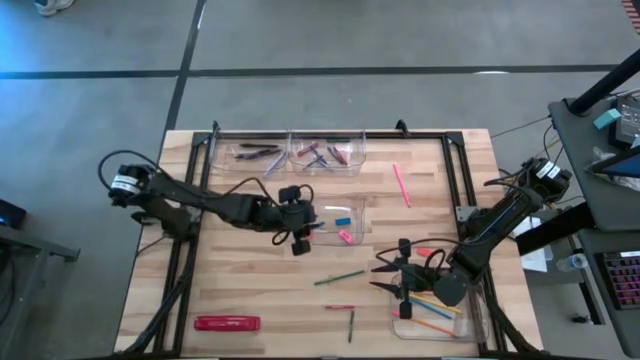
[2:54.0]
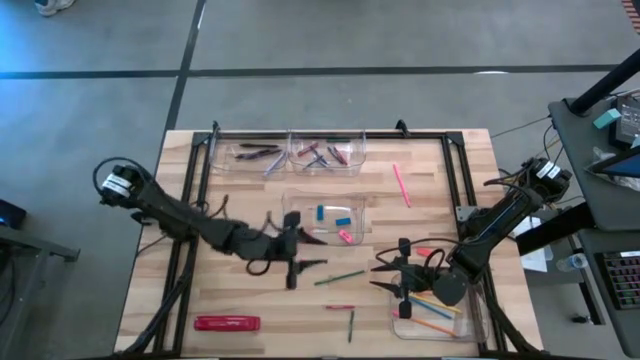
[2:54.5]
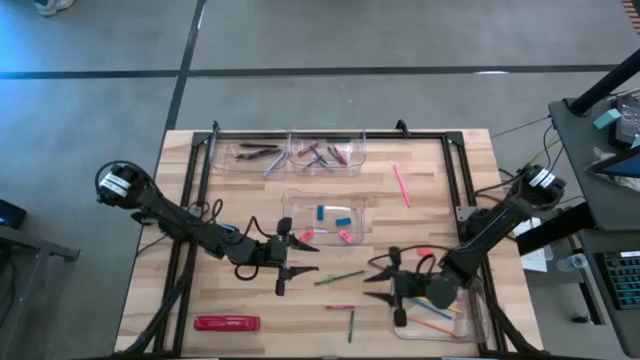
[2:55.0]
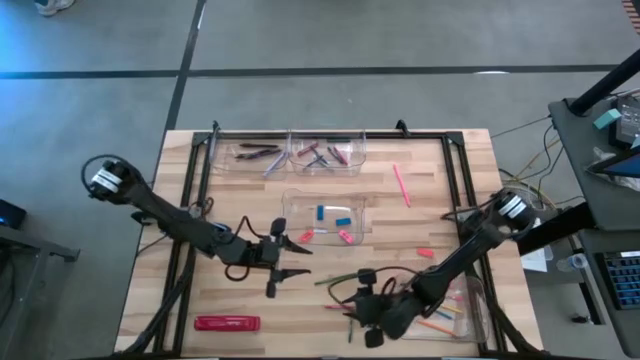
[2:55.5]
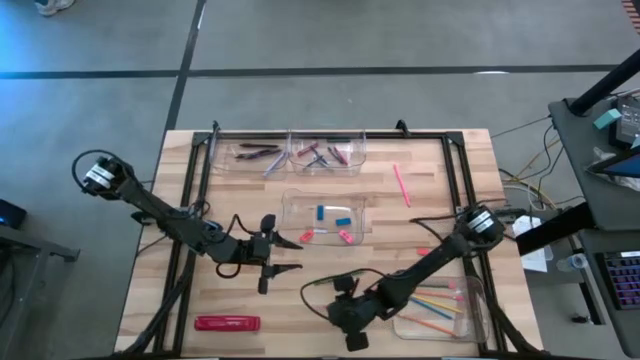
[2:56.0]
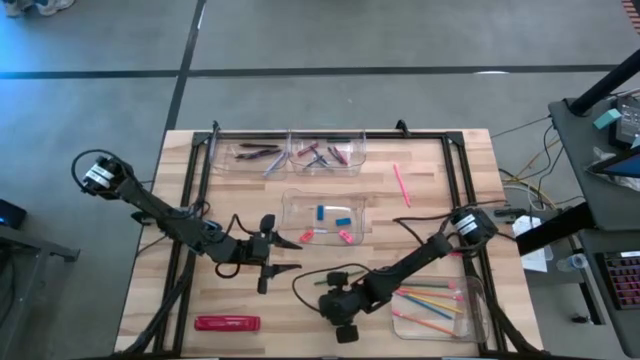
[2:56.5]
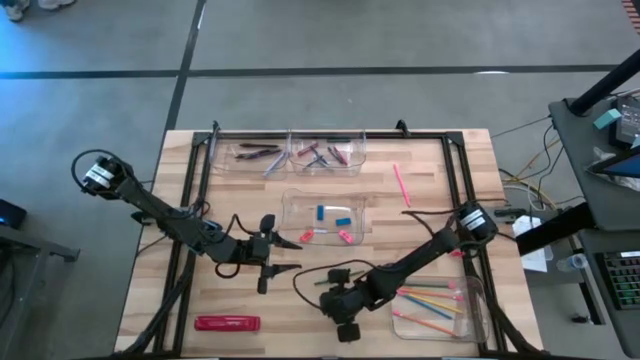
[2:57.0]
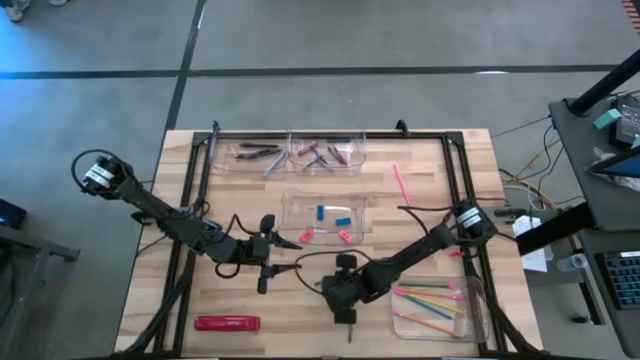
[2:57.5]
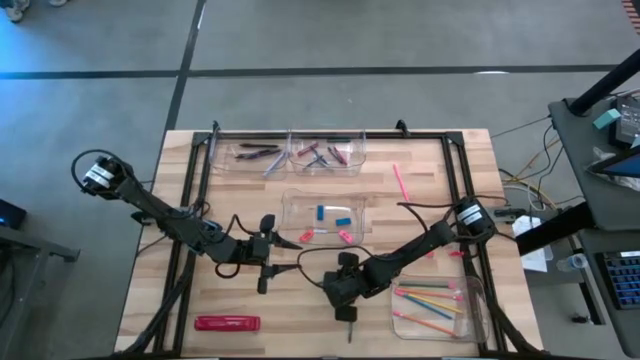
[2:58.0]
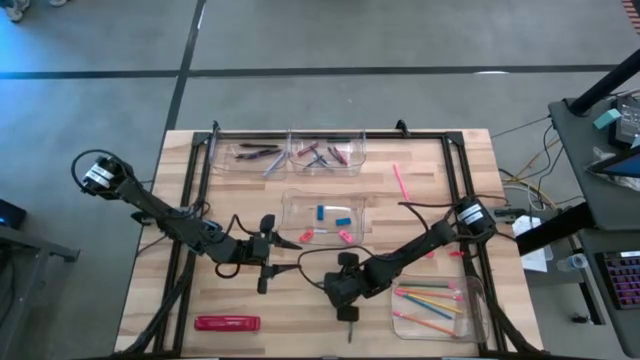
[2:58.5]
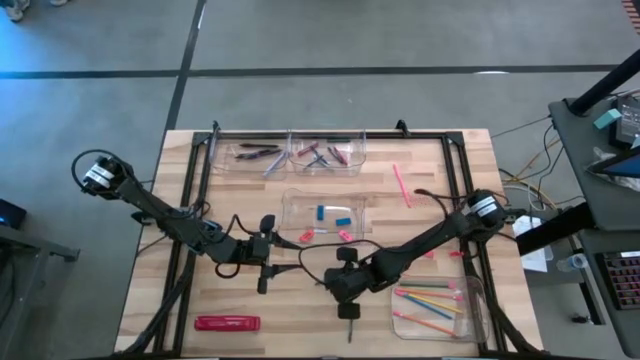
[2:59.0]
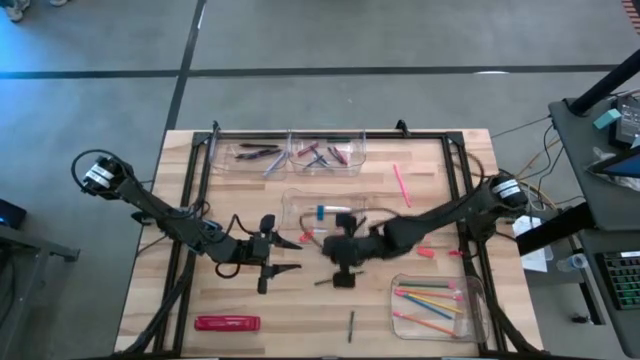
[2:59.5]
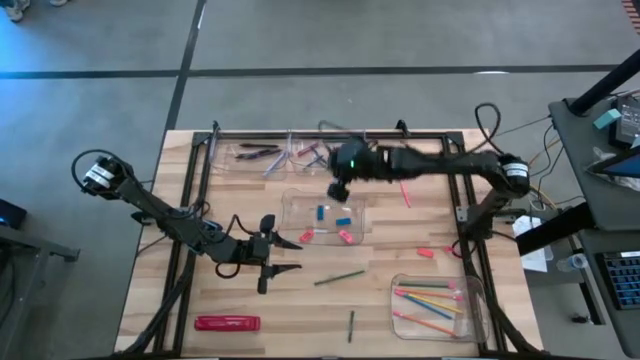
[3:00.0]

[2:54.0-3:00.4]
Task: Sort crayons/erasers/pens/pencils in bins
Put the red crayon into the top right transparent bin

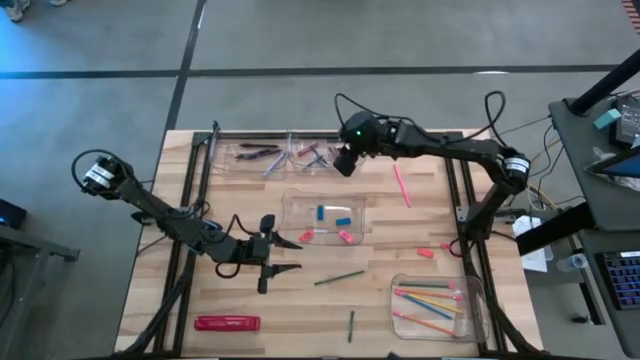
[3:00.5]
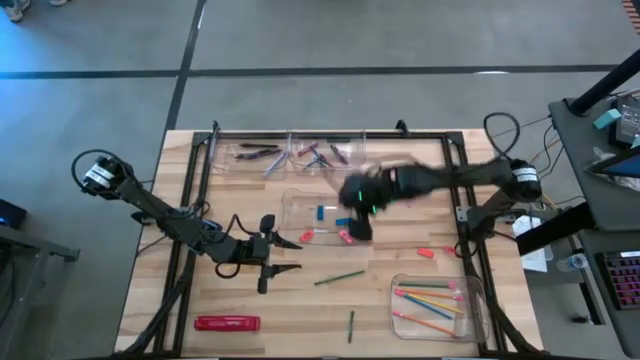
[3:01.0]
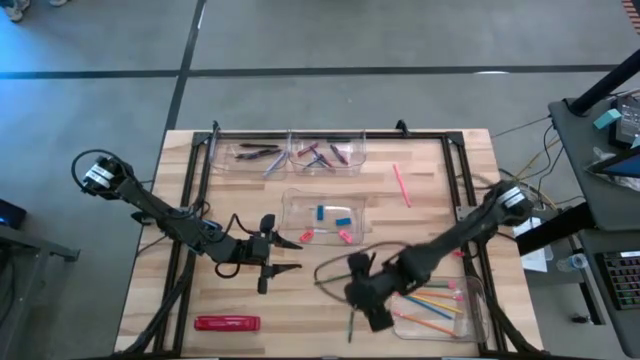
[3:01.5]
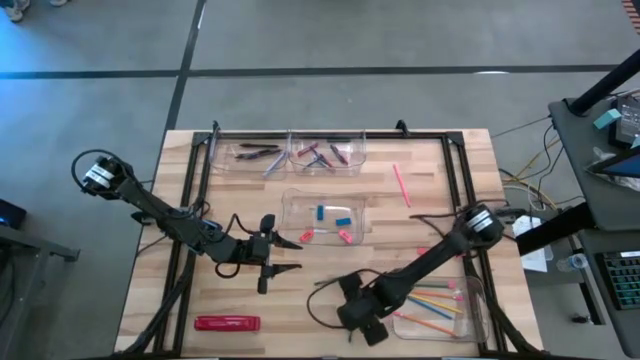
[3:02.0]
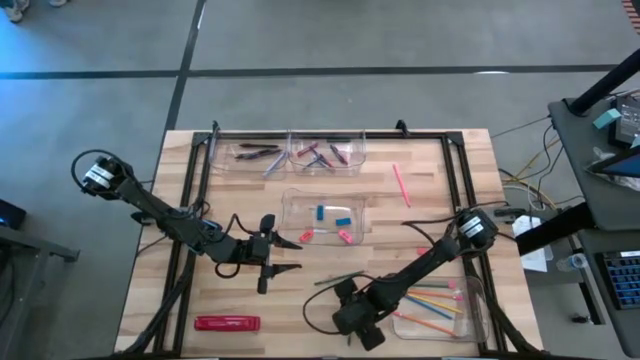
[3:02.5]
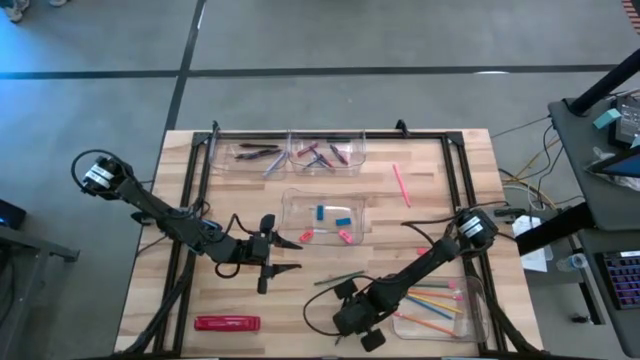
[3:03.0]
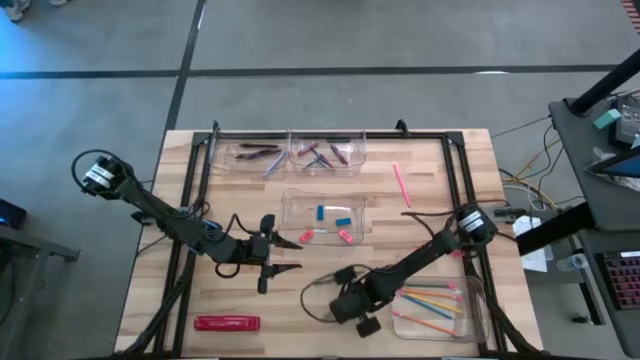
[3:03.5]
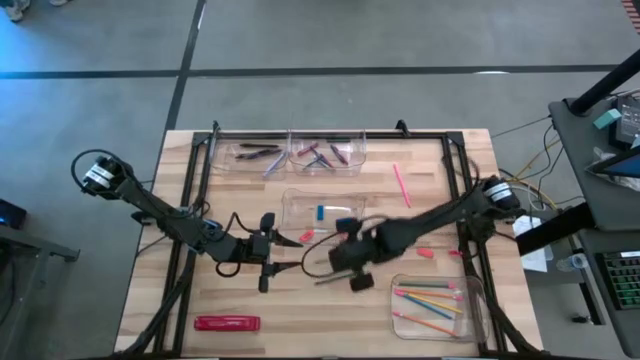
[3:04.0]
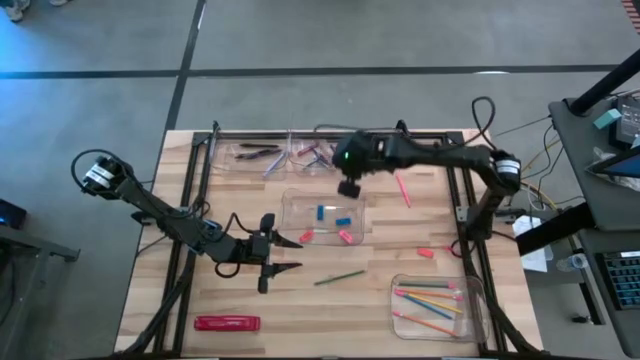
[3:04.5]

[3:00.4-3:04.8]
Put the green crayon into the top right transparent bin

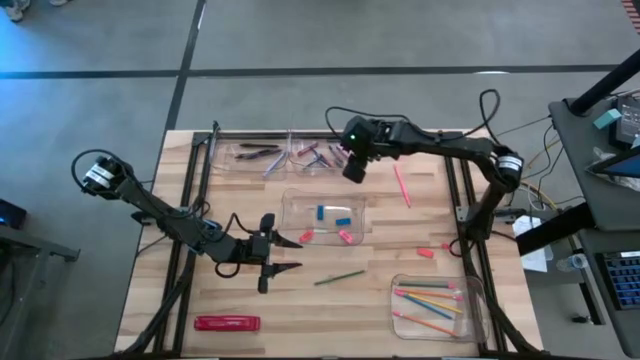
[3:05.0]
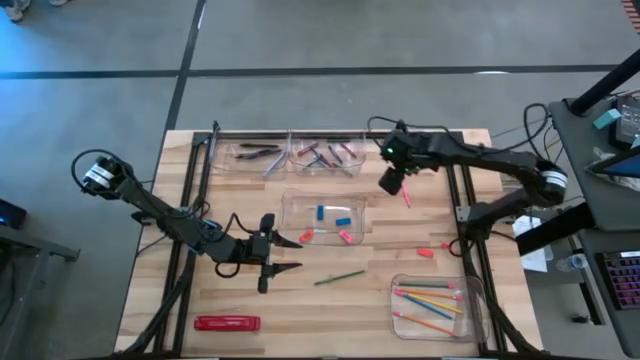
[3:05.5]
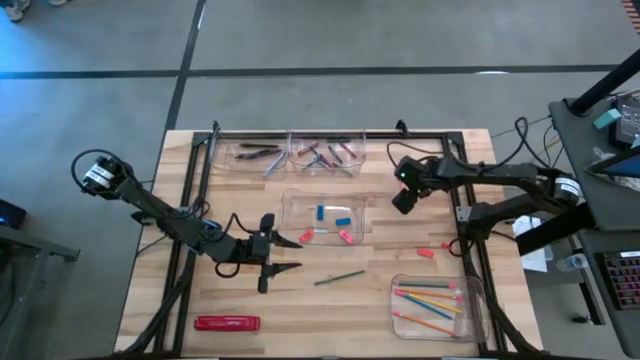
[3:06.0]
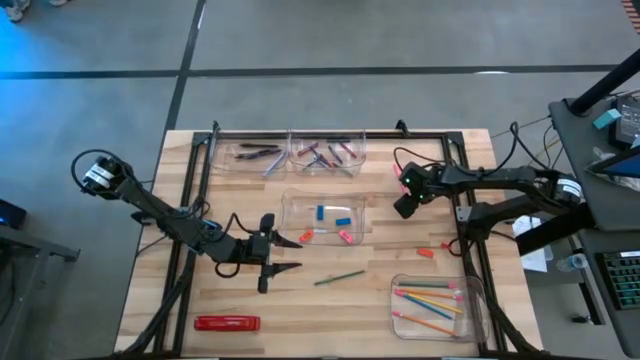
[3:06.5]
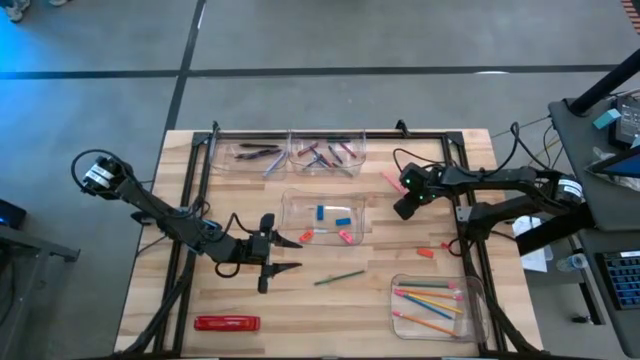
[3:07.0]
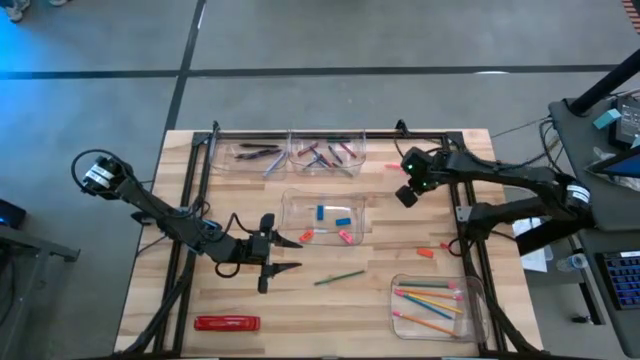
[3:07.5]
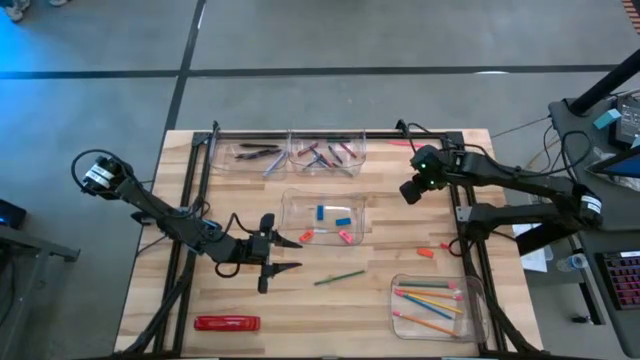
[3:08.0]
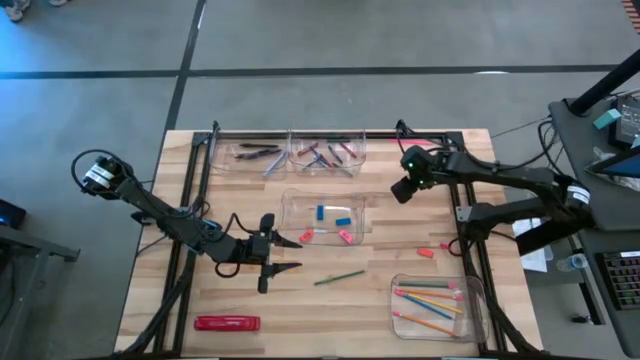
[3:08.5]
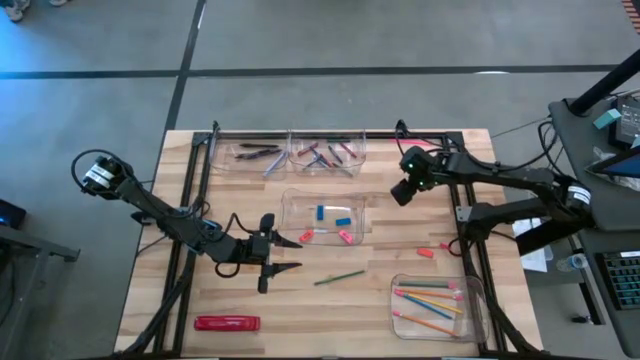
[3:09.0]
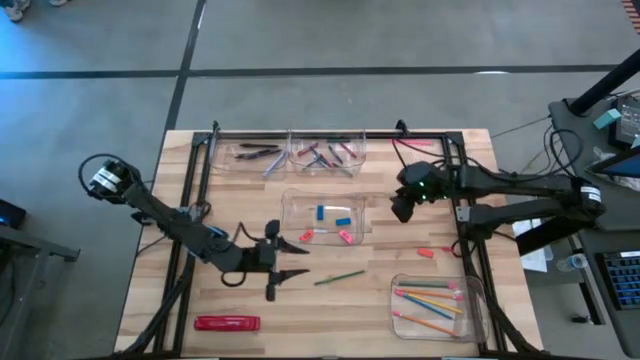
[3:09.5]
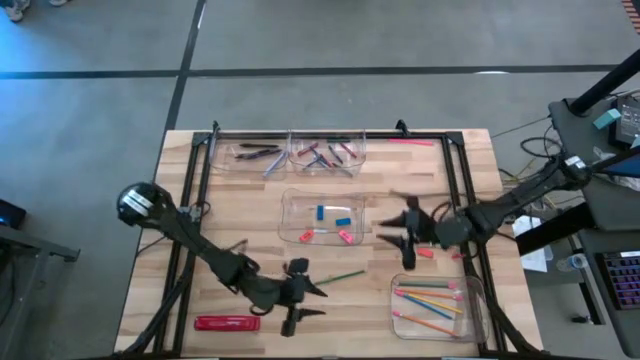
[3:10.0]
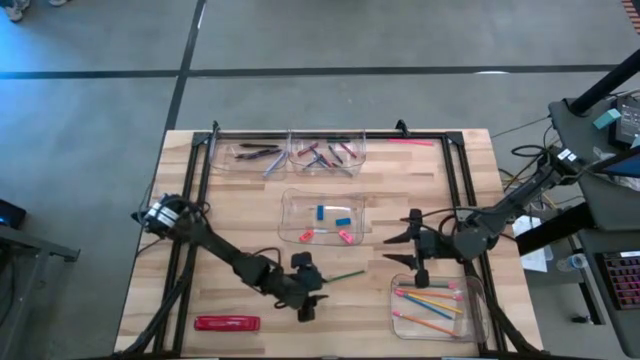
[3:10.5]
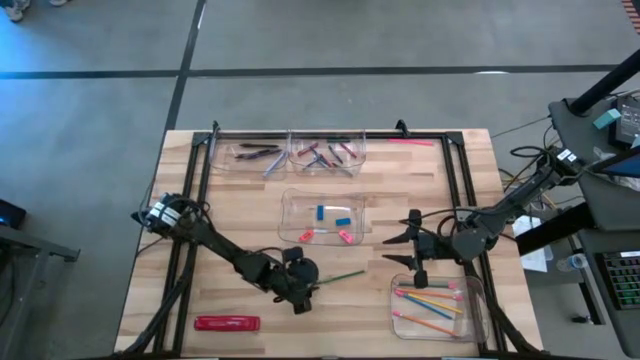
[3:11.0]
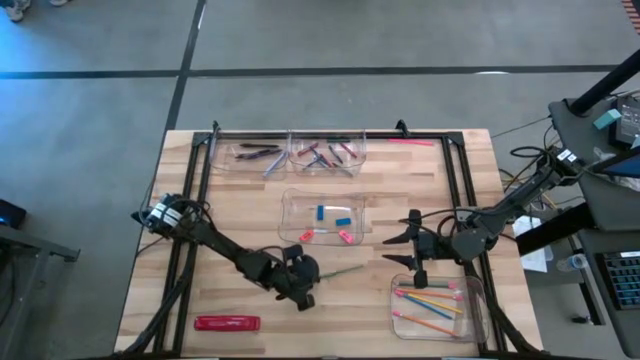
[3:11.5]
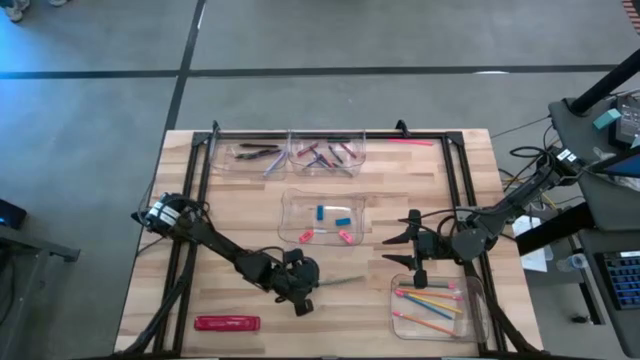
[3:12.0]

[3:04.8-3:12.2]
Put the green pencil into the bottom transparent bin

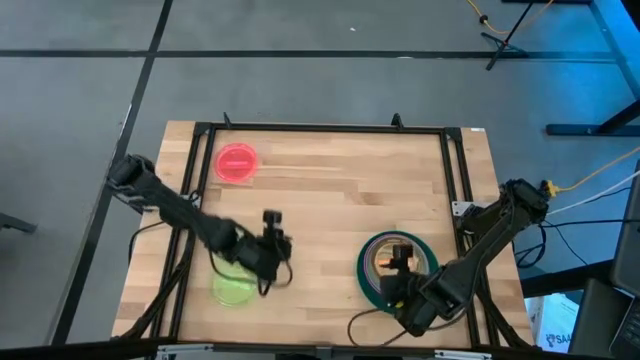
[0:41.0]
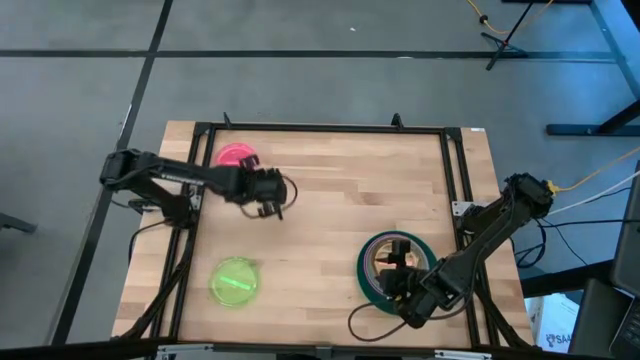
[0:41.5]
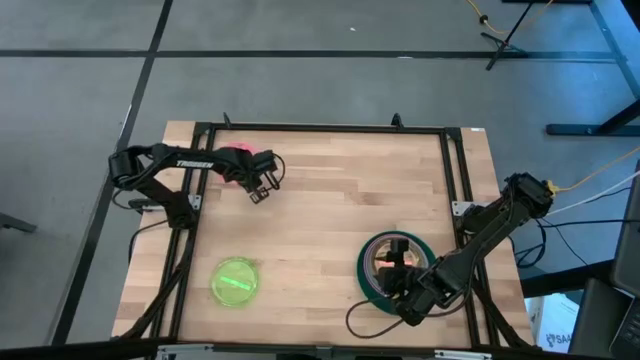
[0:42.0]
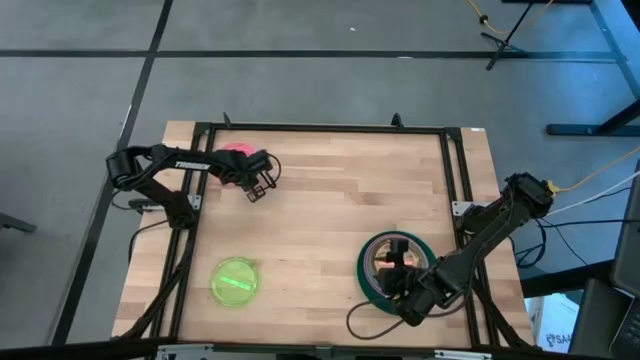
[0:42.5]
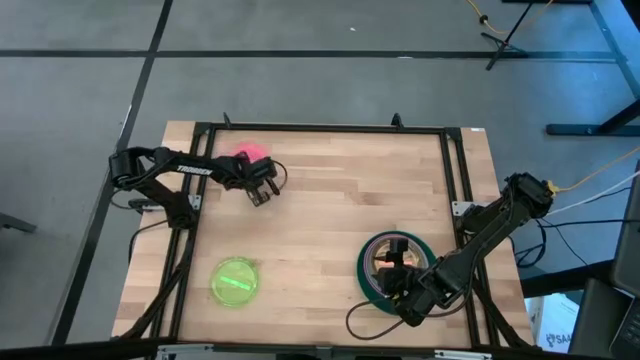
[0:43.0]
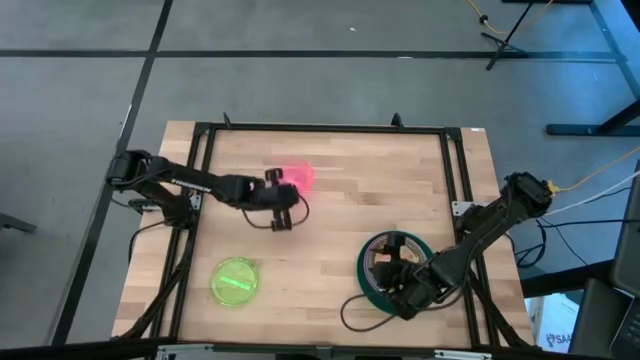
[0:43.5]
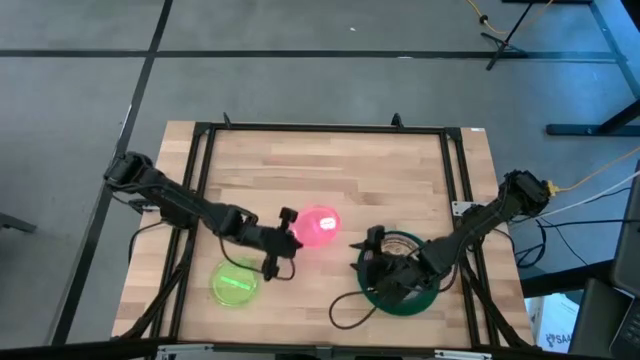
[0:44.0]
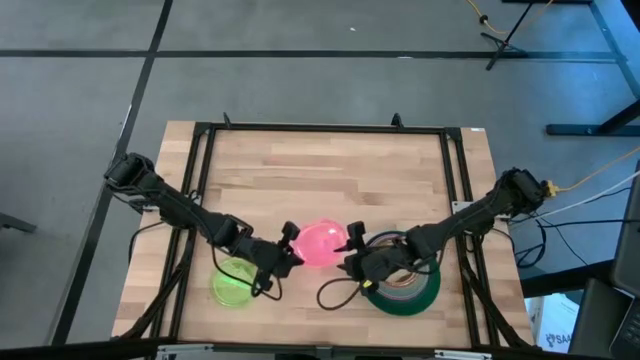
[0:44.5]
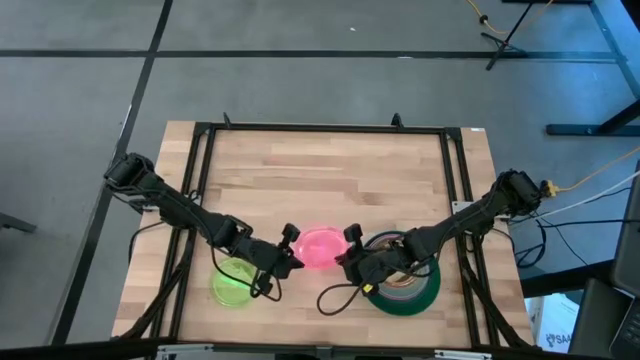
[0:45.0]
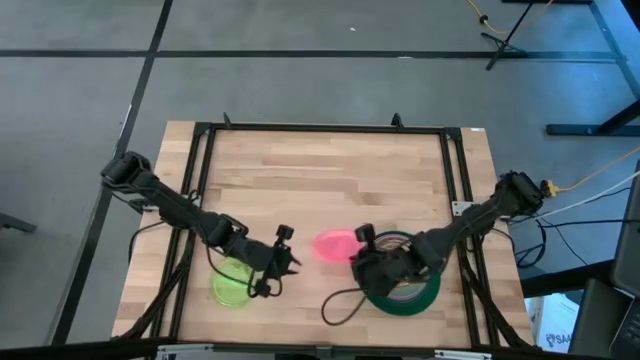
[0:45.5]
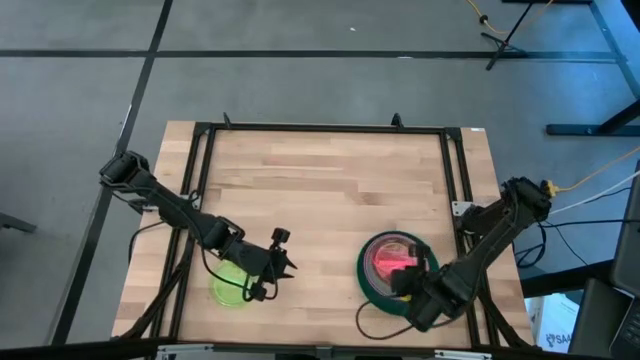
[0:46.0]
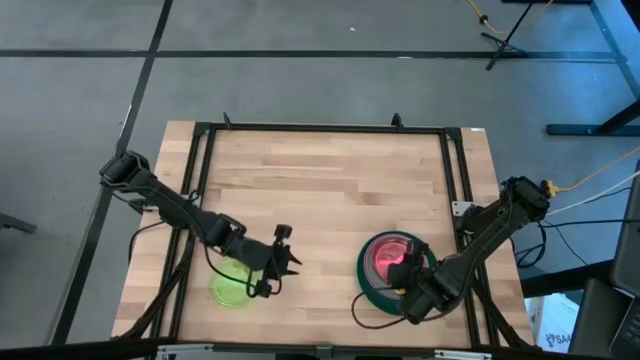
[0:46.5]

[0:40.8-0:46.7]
Task: Stack plastic plates
Stack the light pink plate on the light orange plate
